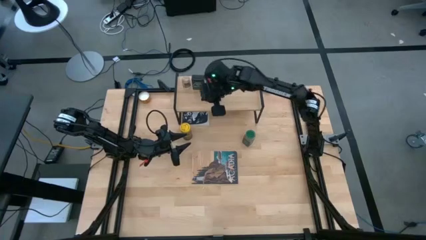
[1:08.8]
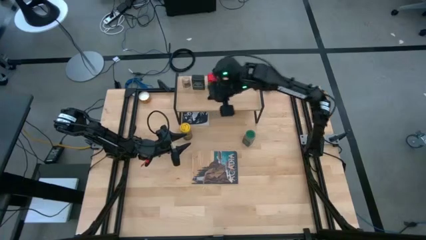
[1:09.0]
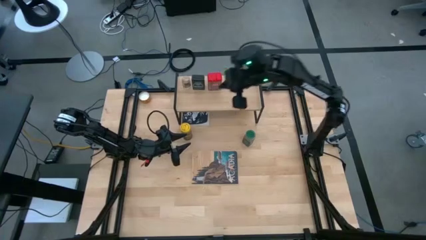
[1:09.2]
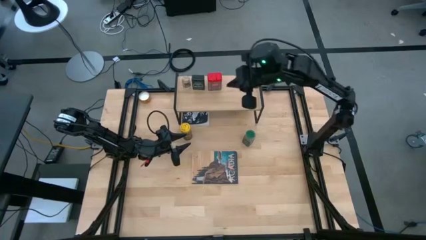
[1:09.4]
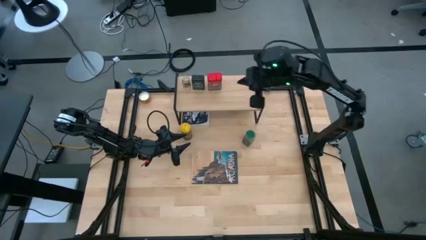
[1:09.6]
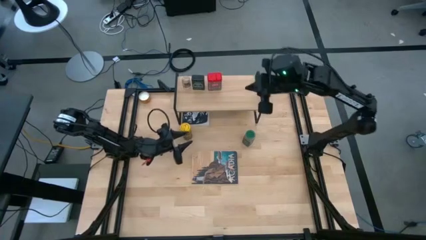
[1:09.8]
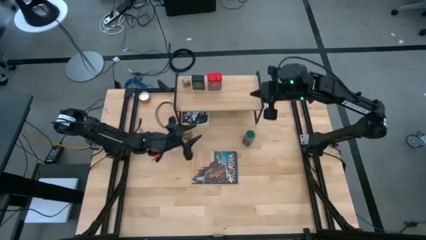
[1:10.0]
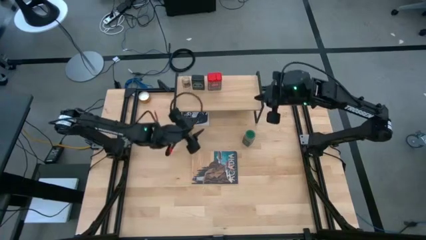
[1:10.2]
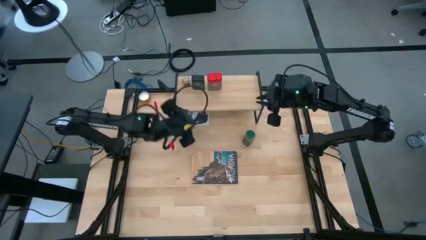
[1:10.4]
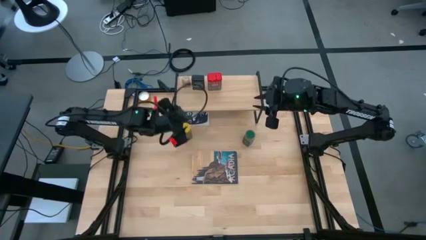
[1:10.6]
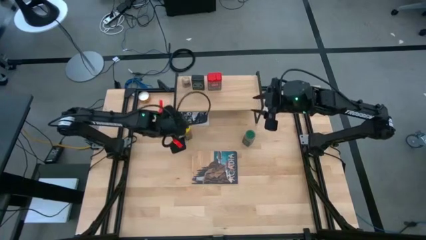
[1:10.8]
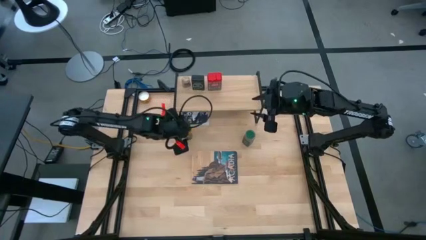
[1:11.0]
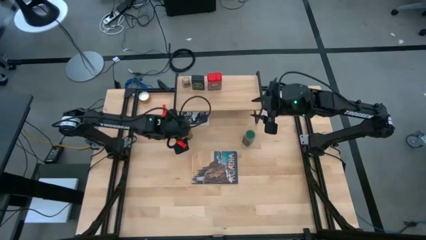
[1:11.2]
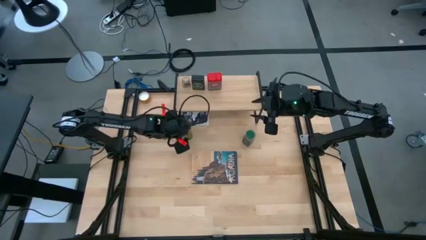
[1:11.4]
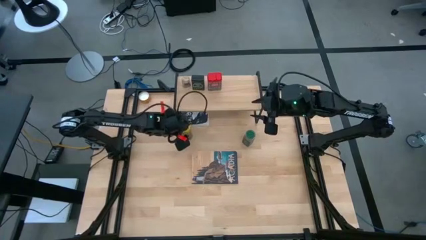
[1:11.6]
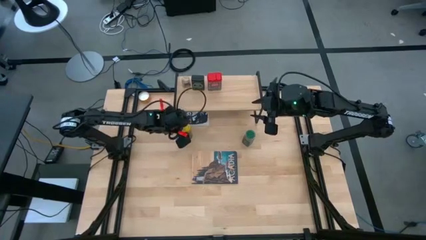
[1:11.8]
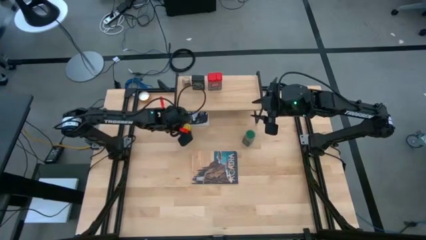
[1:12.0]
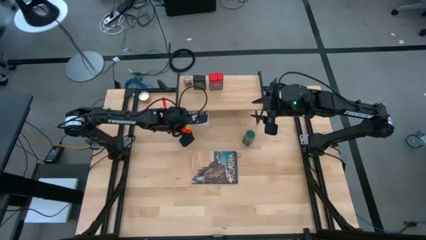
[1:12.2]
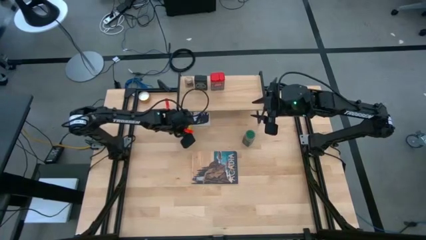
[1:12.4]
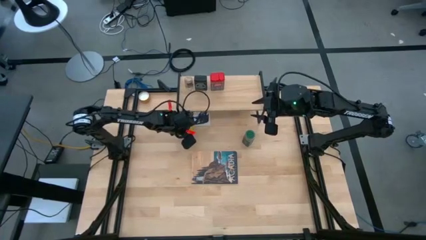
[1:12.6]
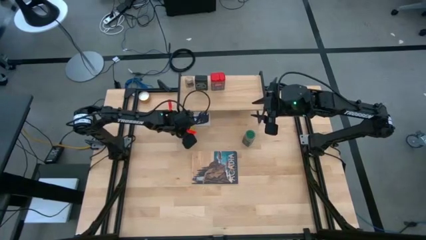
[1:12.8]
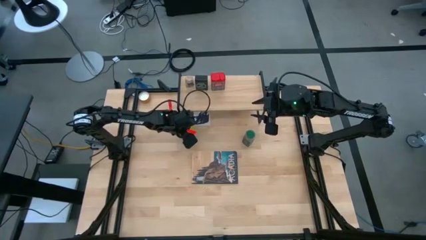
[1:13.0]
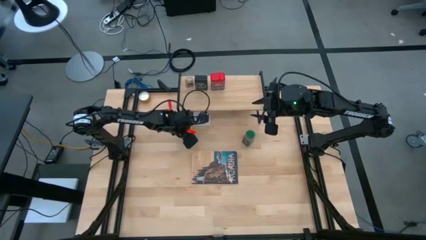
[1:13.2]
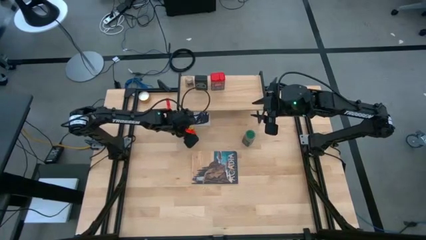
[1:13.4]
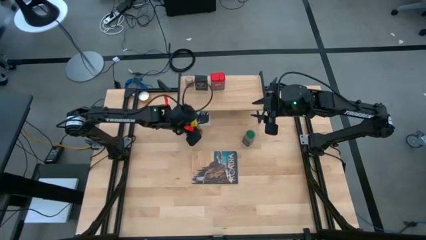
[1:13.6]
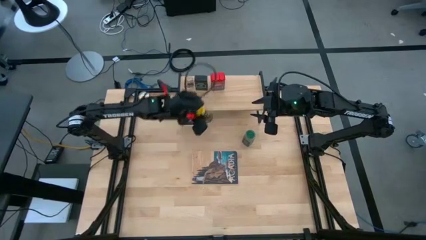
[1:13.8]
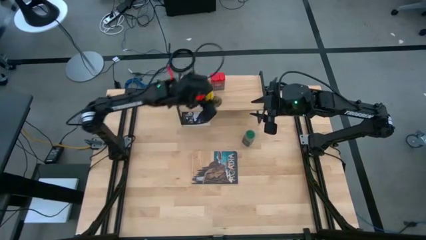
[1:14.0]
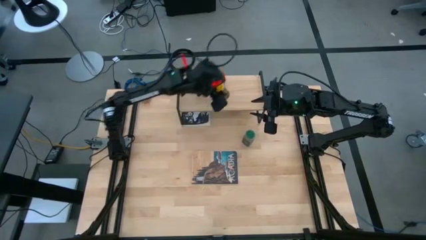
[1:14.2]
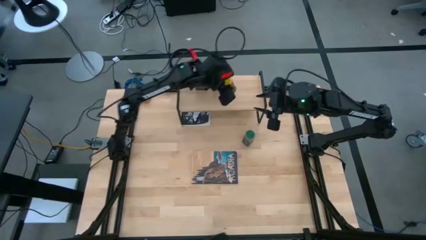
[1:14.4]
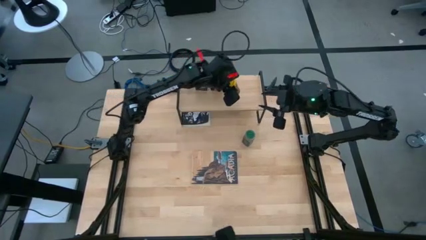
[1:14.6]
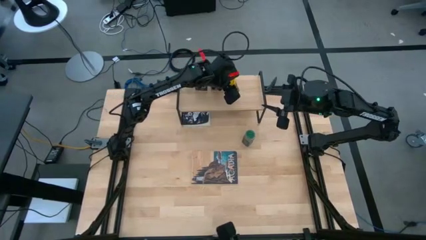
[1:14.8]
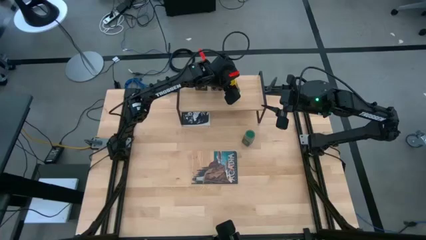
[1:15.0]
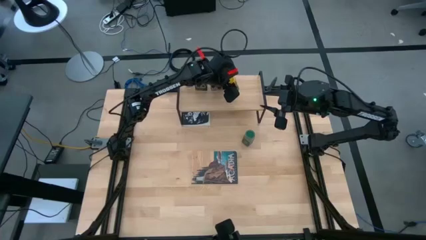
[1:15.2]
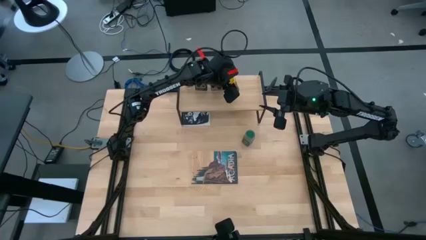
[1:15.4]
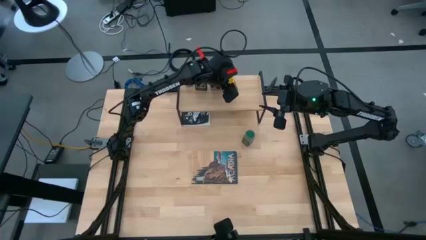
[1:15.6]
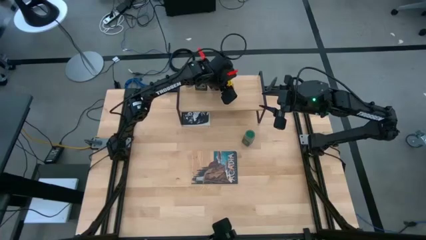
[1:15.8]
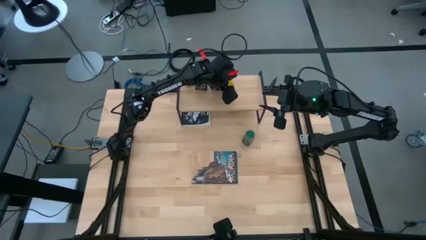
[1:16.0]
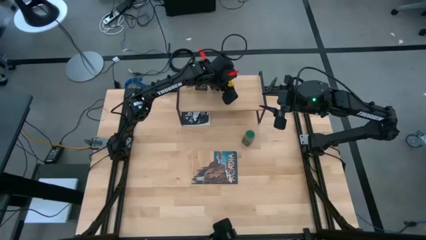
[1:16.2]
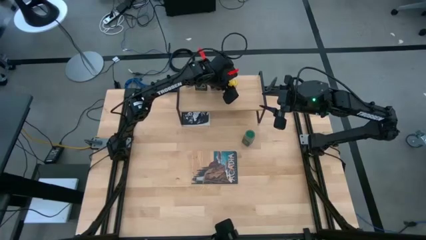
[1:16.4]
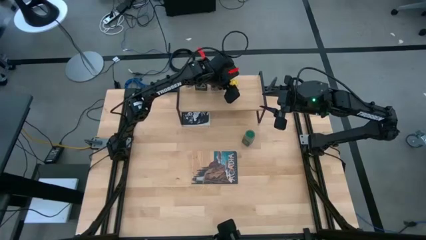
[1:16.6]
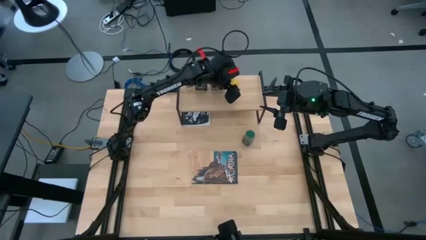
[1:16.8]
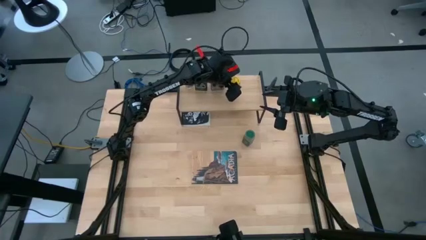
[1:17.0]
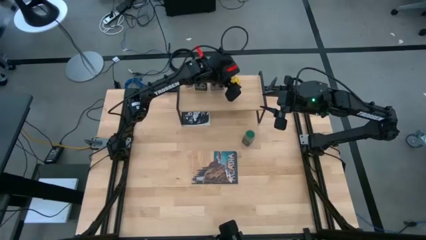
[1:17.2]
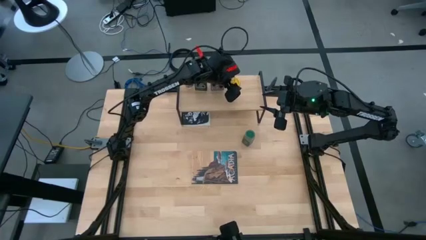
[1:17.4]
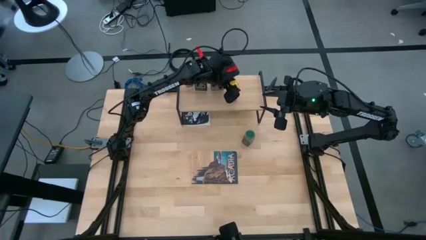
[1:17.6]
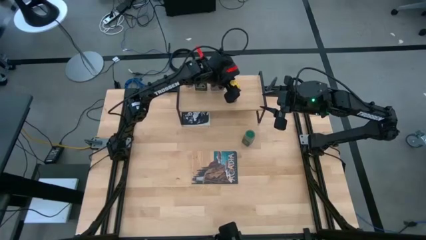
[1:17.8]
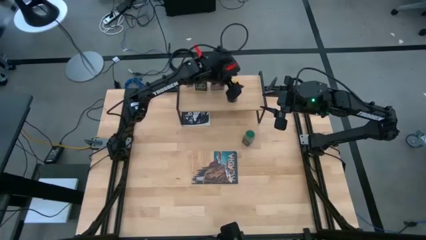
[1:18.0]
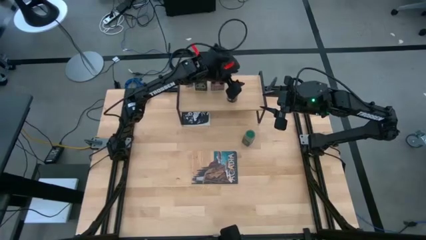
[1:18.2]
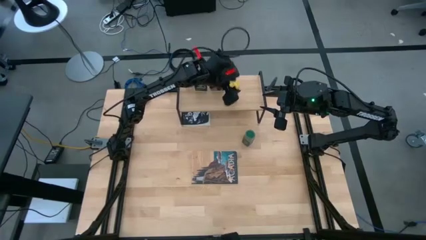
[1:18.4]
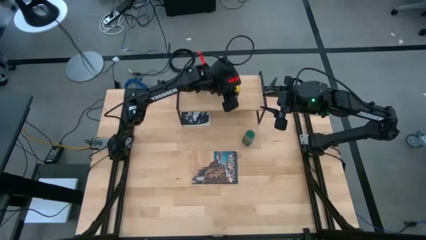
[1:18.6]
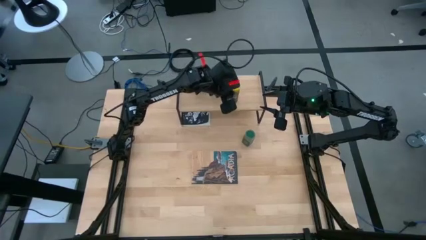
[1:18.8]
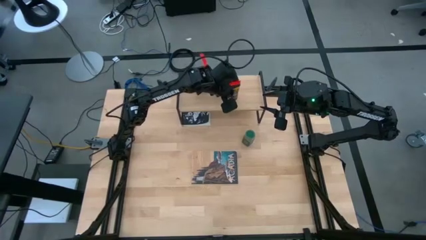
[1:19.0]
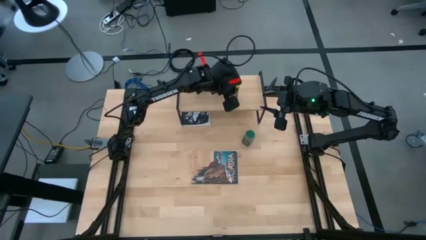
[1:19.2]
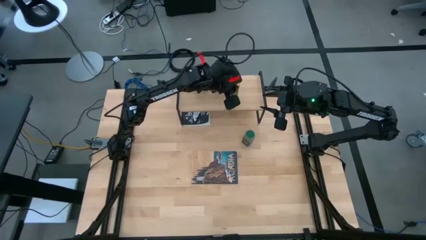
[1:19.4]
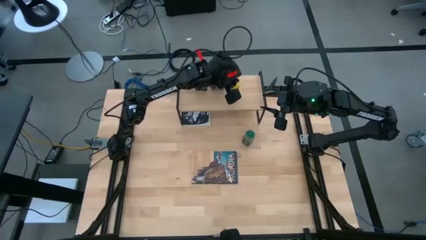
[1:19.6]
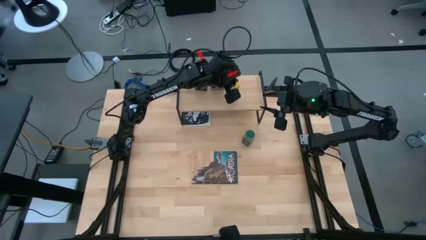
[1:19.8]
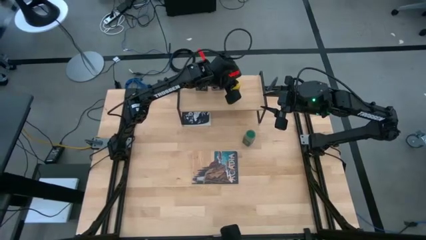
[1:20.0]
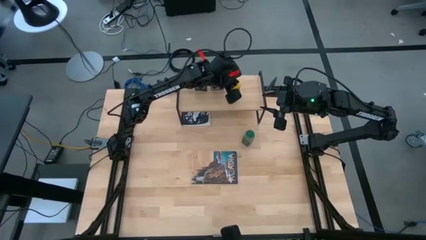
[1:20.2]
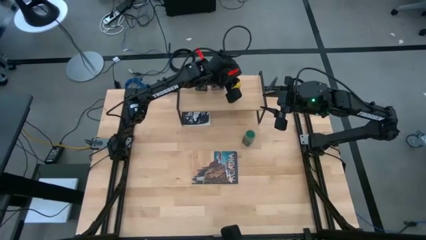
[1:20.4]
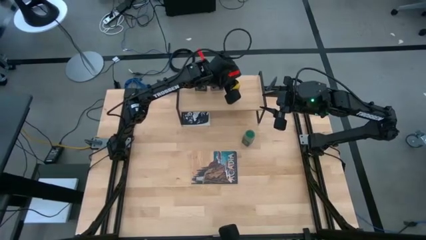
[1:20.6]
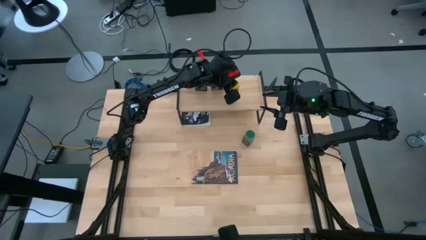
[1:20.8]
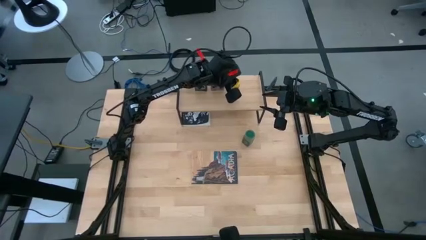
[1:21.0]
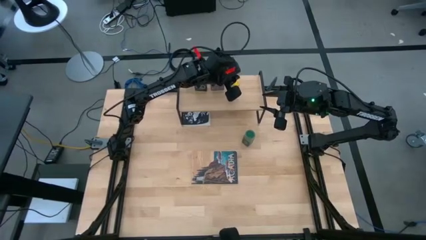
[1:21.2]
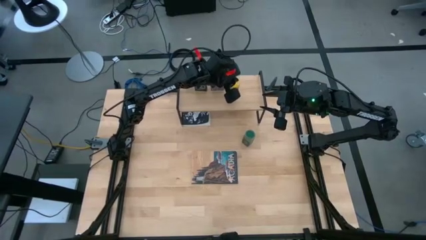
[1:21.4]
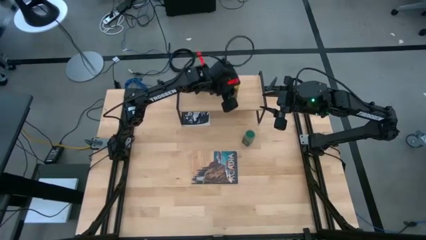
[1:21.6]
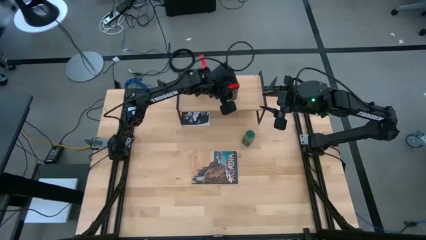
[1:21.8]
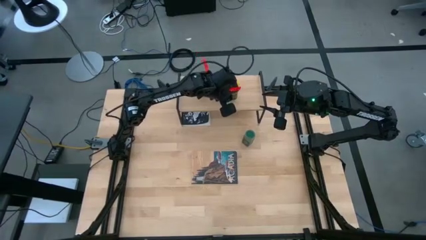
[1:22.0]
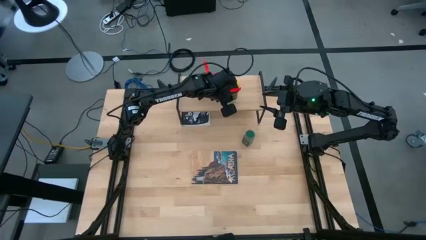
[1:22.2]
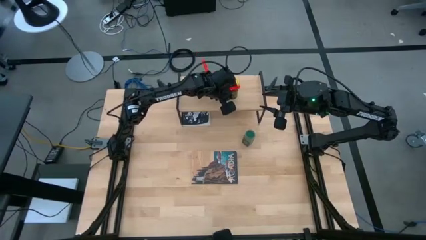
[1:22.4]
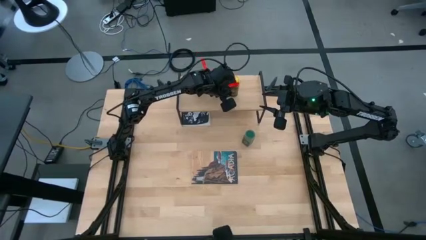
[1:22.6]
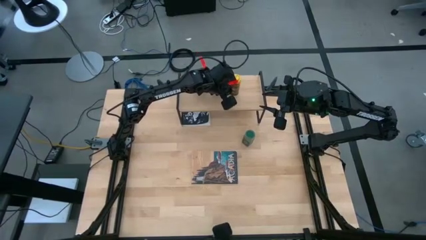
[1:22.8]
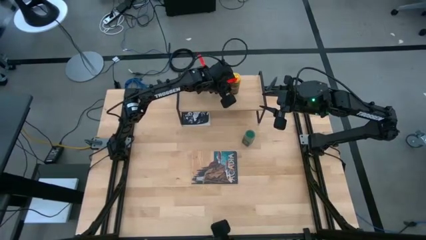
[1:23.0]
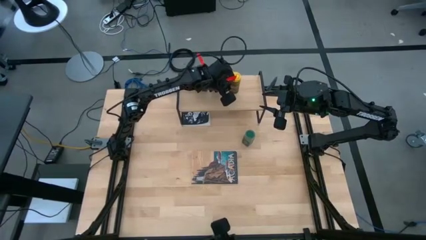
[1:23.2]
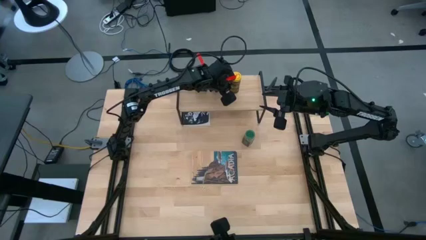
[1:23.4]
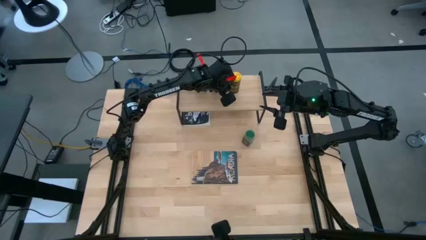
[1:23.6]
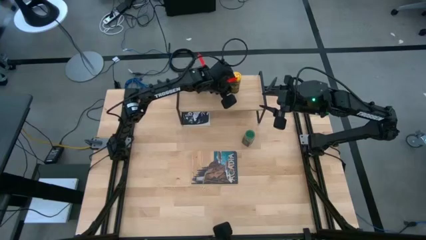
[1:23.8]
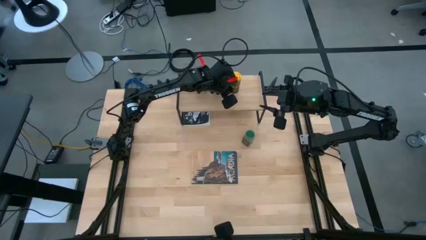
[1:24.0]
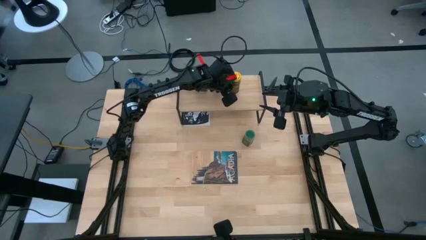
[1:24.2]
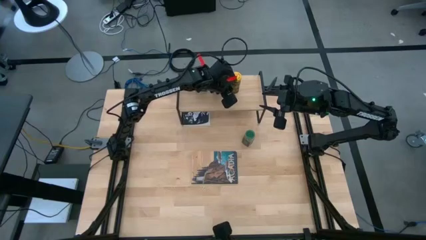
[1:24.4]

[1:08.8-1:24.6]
Task: Shelf spices
Put the yellow seasoning bottle on the shelf

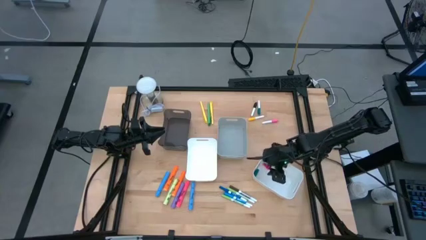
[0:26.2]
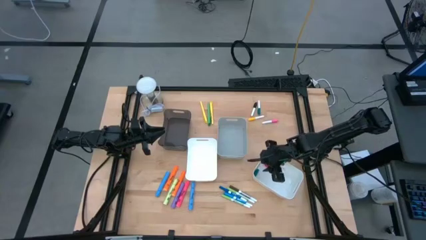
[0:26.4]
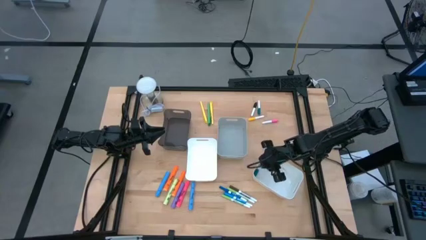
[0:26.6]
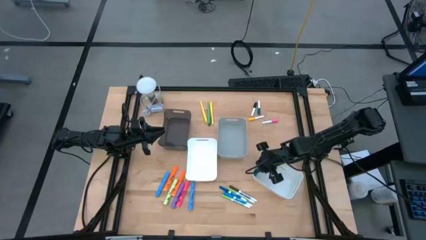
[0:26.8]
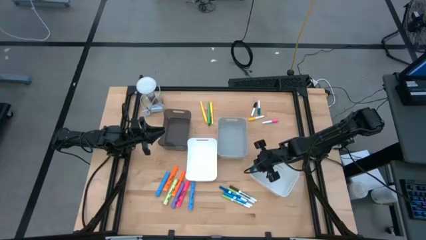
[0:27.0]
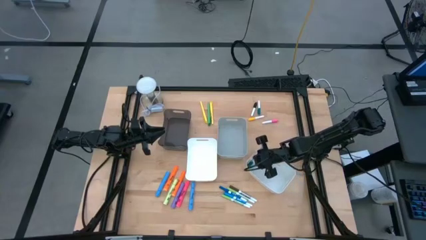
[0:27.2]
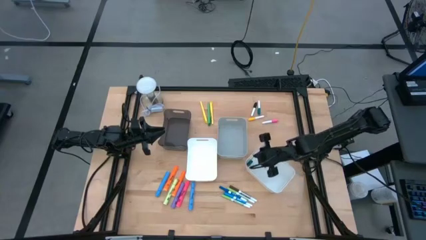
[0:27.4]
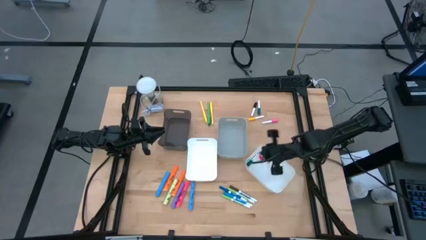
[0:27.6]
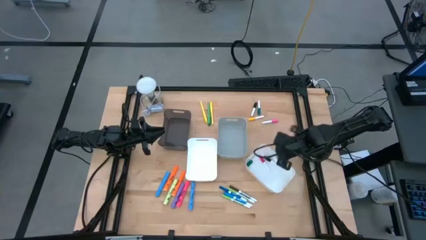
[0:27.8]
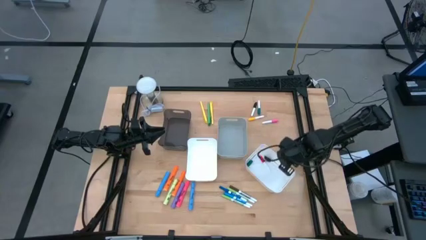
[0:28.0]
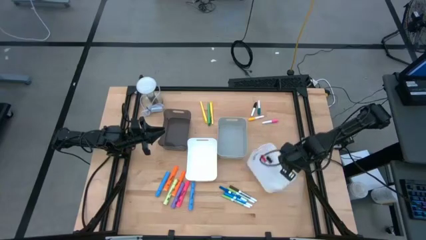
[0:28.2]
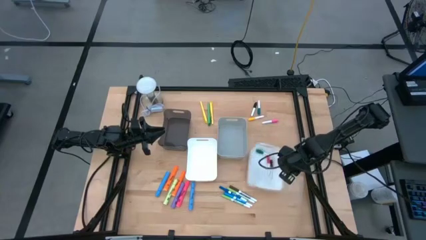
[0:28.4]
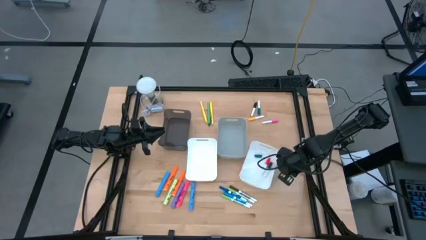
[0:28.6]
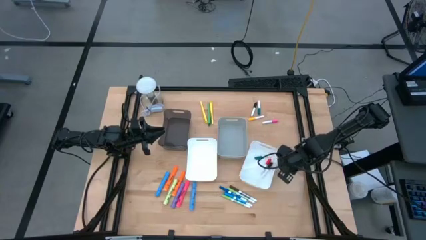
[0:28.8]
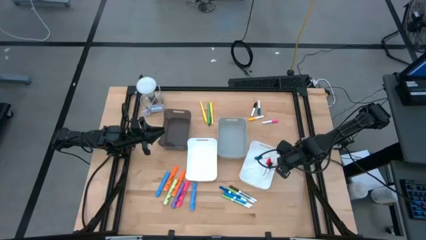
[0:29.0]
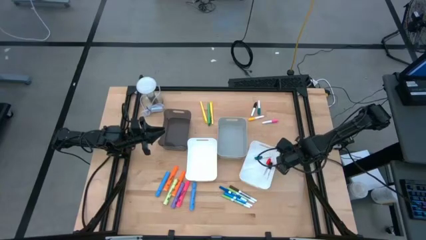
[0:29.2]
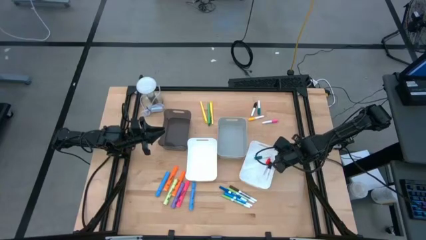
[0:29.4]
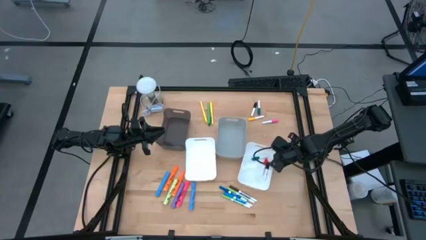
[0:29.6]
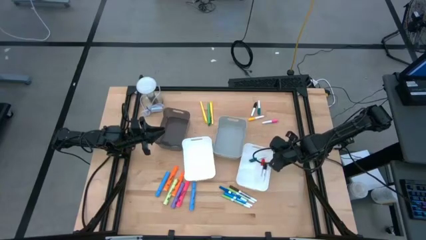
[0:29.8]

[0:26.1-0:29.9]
Task: Pick & Place Markers
Adjust the right white bin
